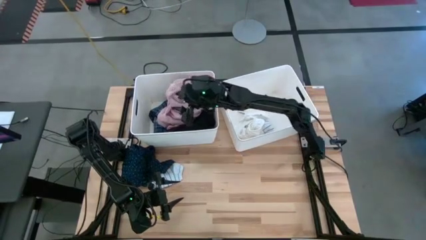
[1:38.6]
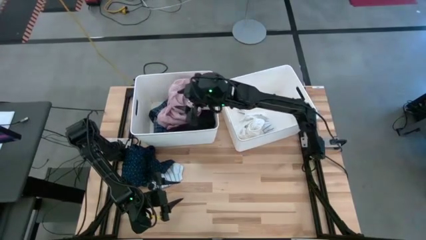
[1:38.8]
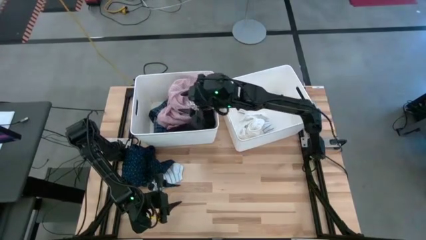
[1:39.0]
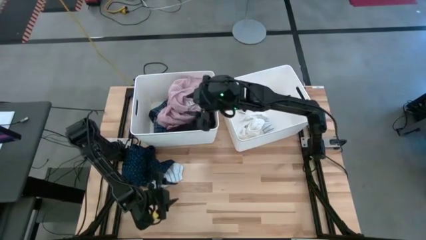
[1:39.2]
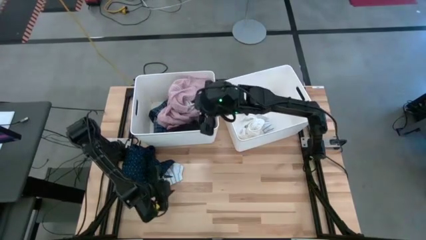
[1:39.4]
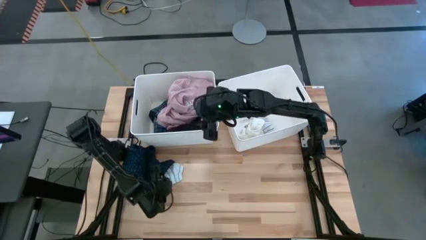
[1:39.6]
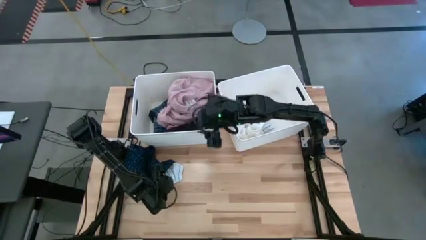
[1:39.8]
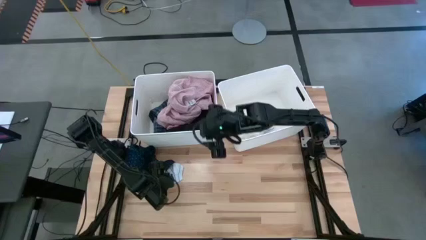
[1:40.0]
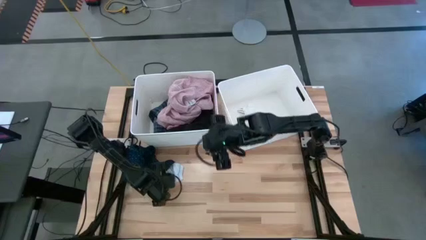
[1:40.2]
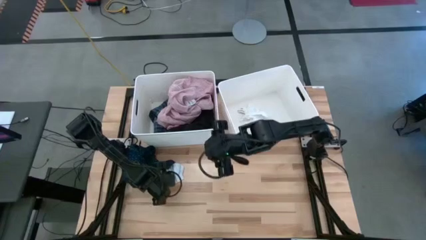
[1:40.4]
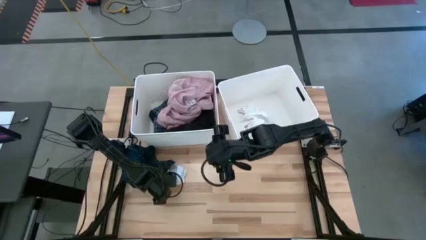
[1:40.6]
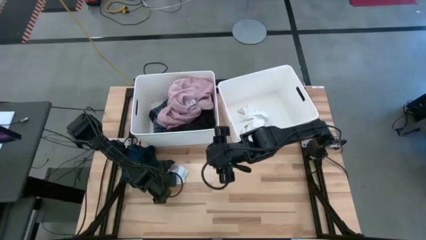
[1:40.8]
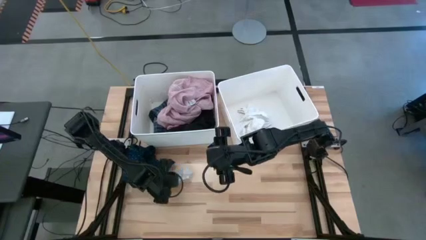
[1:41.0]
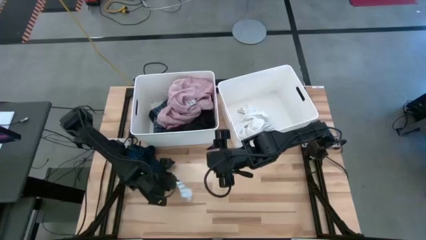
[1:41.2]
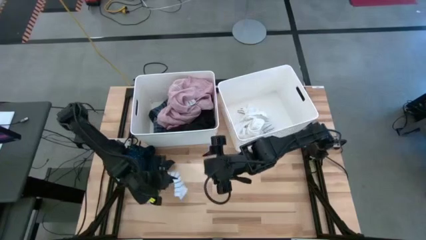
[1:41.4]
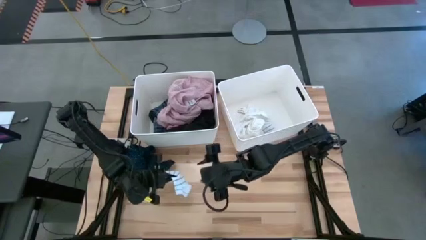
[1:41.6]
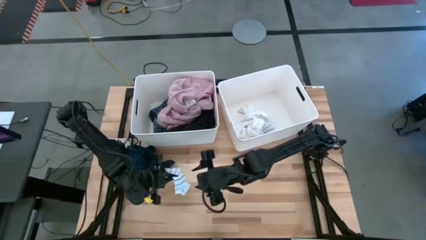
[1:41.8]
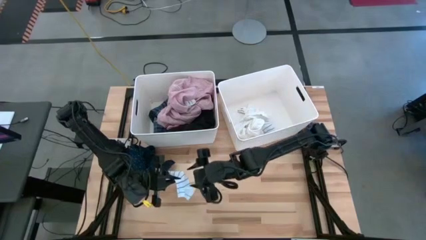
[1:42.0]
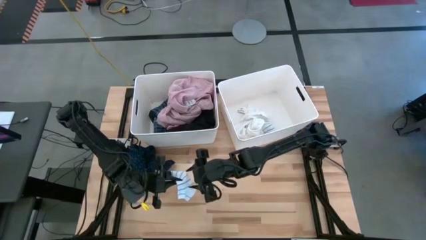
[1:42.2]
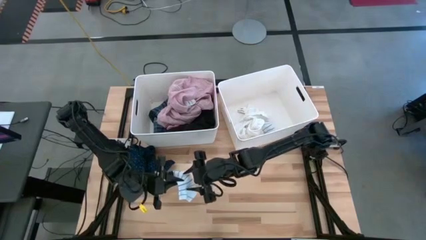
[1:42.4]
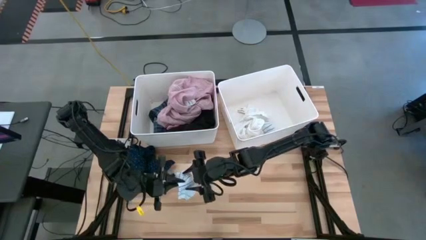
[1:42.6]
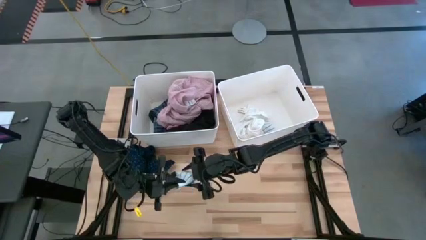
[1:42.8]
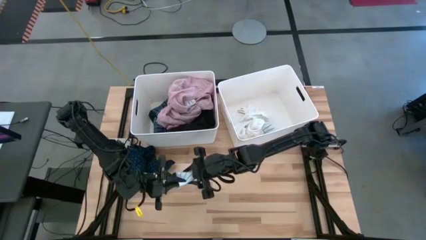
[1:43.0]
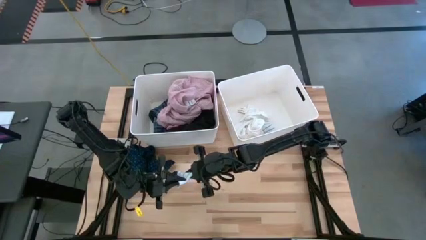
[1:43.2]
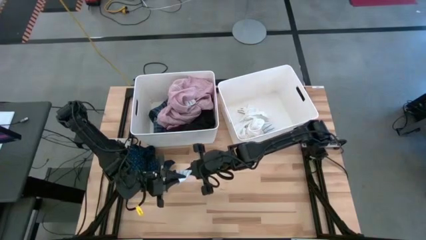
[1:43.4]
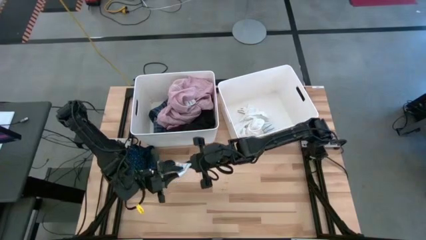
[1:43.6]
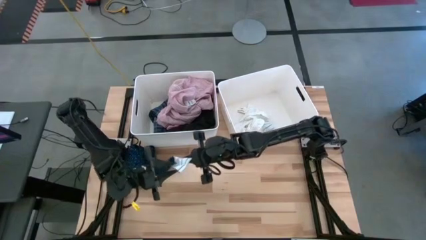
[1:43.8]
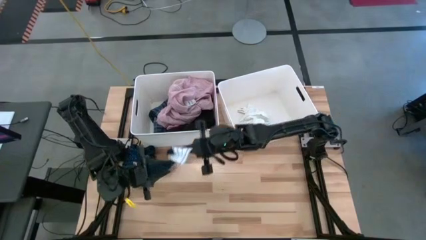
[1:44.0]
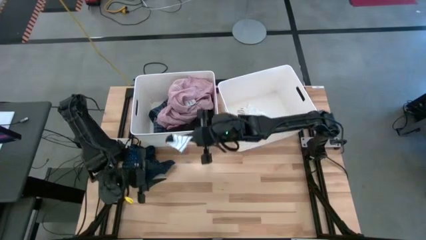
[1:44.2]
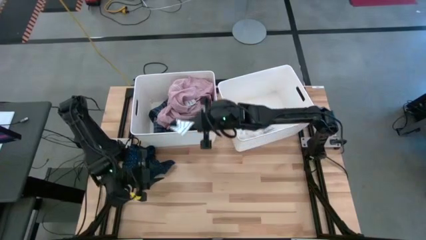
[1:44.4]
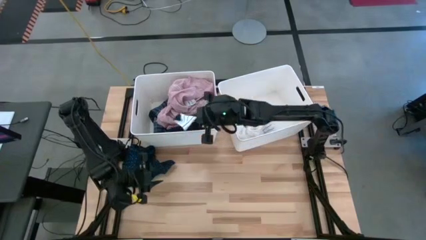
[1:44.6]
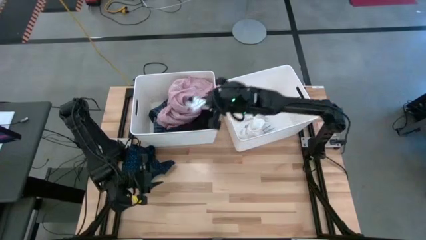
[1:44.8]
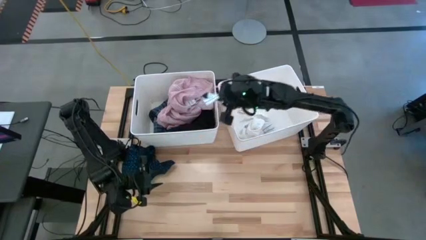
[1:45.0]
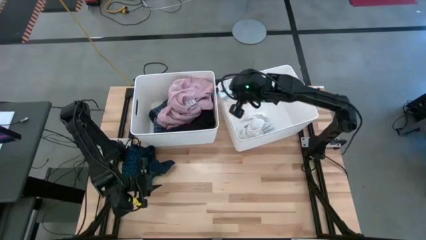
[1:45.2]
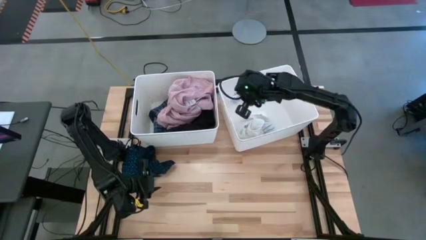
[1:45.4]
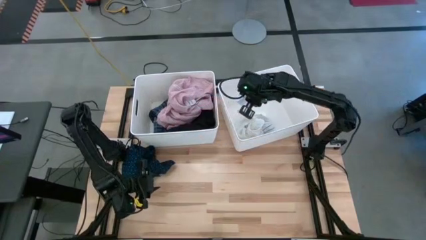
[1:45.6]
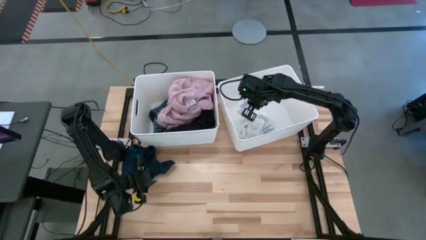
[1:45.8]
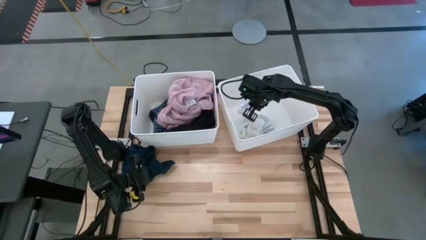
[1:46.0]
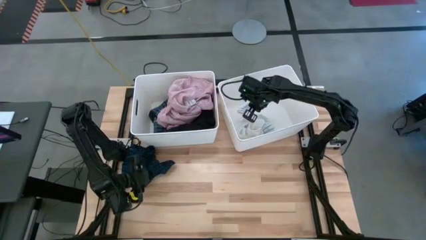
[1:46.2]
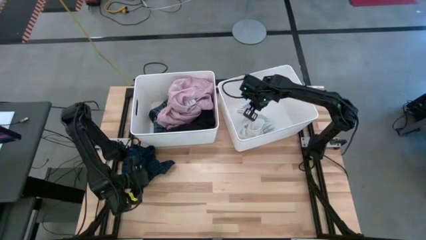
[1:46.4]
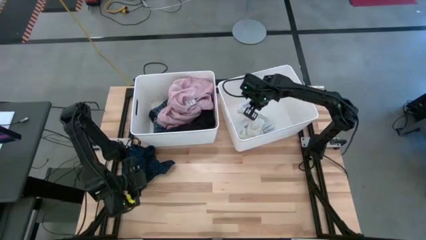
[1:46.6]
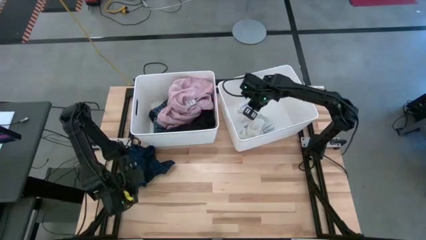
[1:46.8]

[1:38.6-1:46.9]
Task: Sort clothes
Put the white patterned sock into the right laundry bin

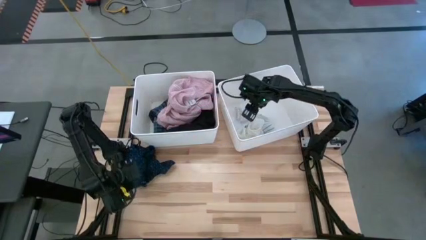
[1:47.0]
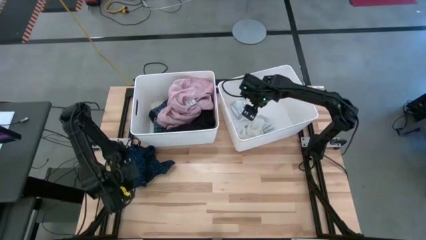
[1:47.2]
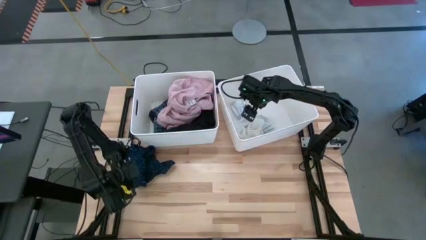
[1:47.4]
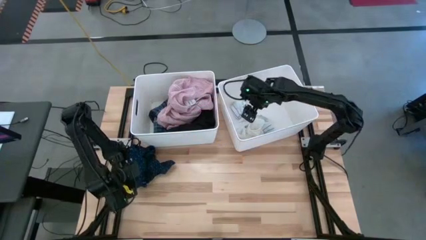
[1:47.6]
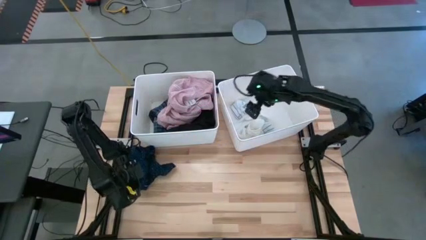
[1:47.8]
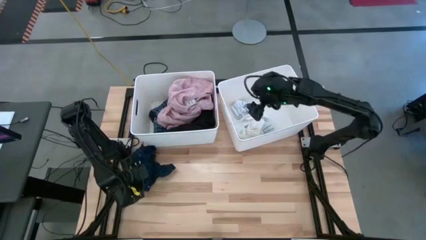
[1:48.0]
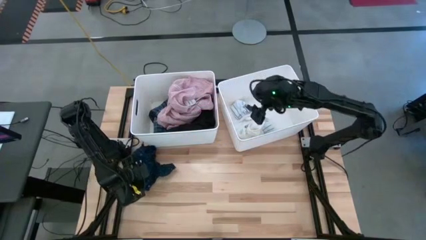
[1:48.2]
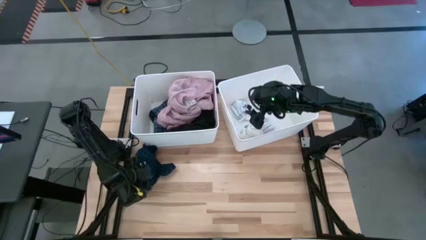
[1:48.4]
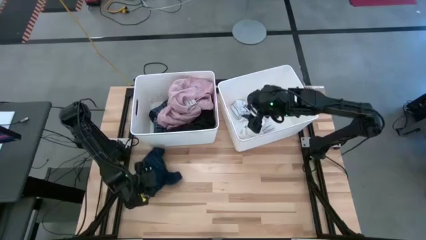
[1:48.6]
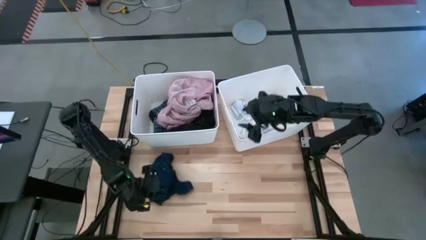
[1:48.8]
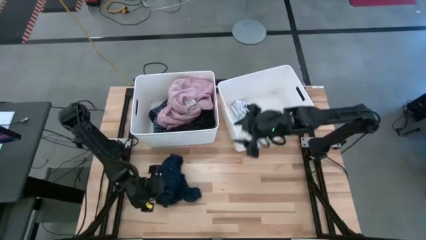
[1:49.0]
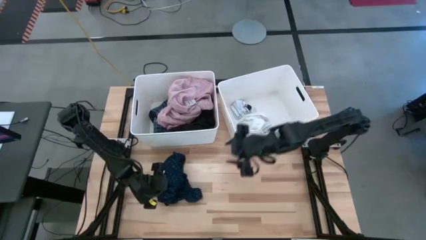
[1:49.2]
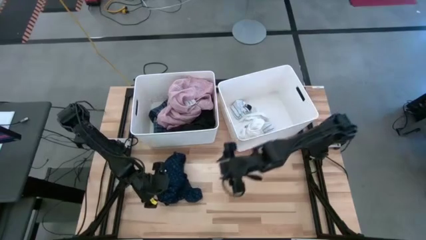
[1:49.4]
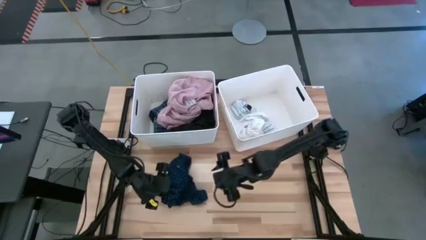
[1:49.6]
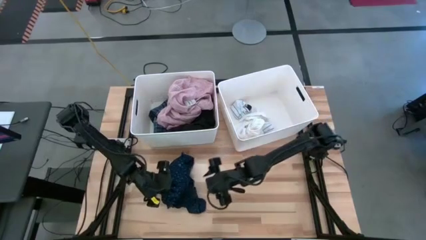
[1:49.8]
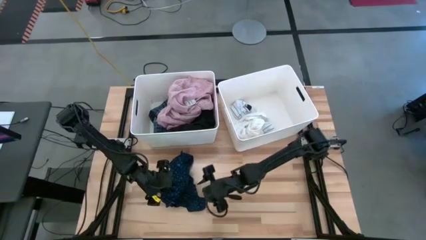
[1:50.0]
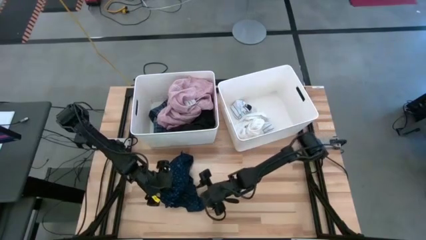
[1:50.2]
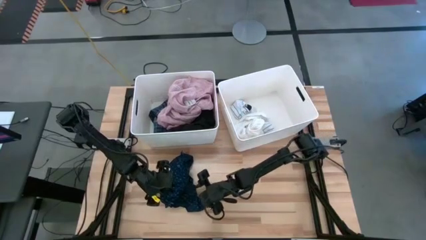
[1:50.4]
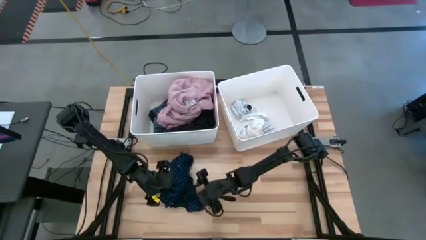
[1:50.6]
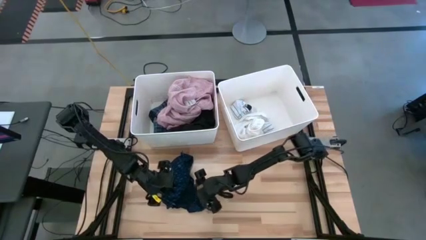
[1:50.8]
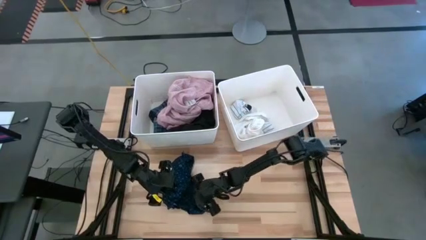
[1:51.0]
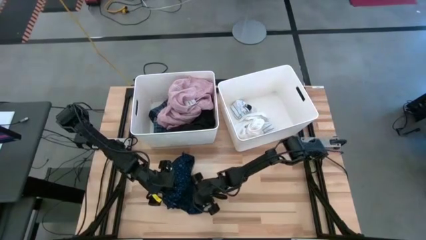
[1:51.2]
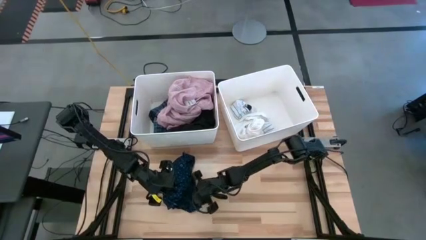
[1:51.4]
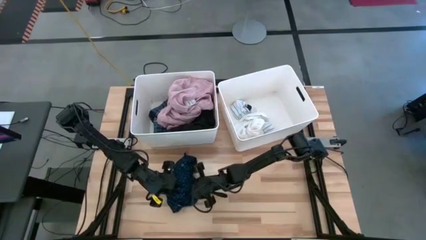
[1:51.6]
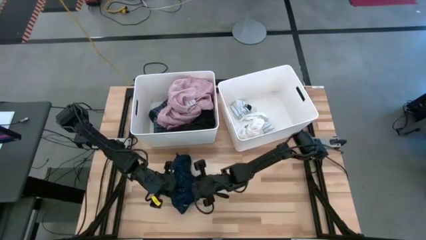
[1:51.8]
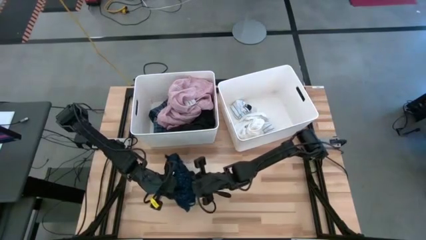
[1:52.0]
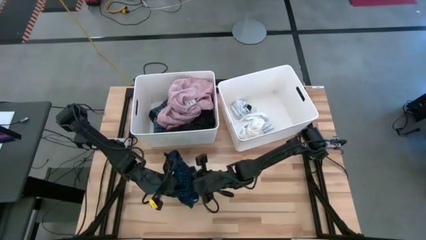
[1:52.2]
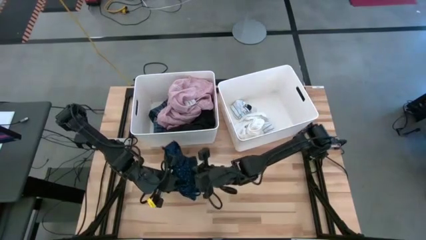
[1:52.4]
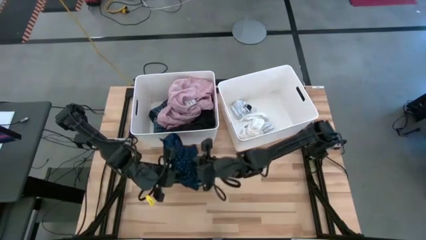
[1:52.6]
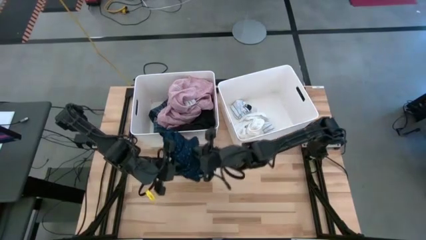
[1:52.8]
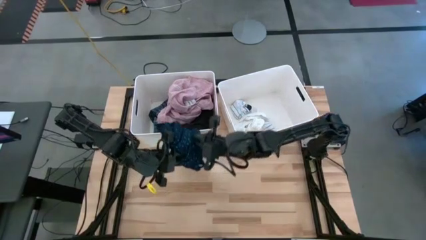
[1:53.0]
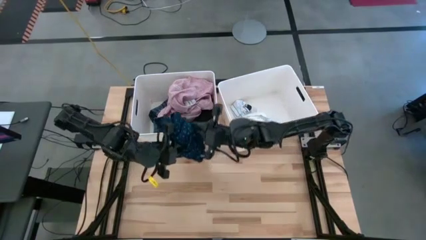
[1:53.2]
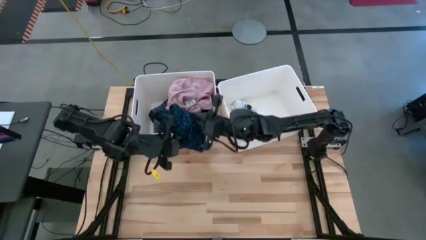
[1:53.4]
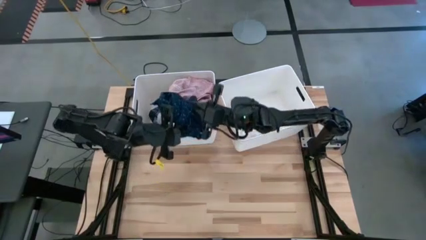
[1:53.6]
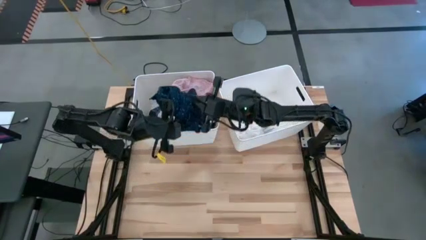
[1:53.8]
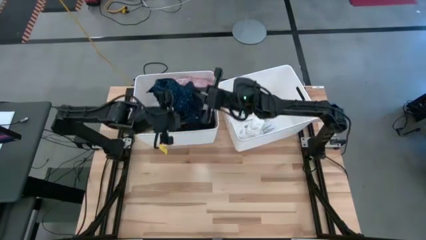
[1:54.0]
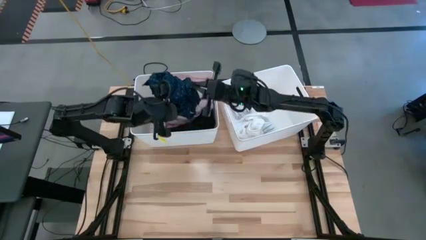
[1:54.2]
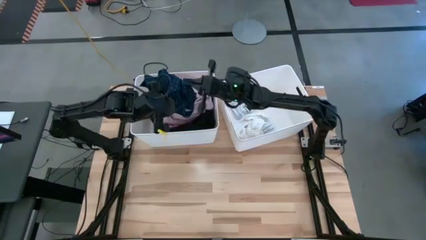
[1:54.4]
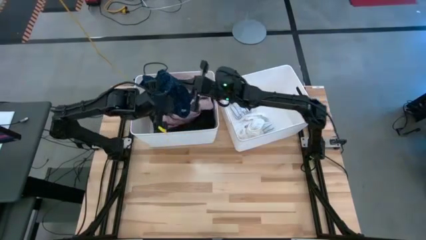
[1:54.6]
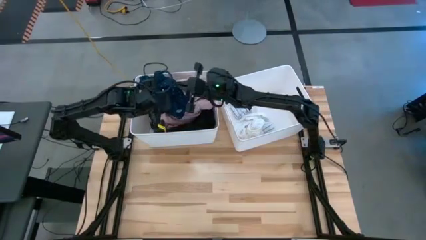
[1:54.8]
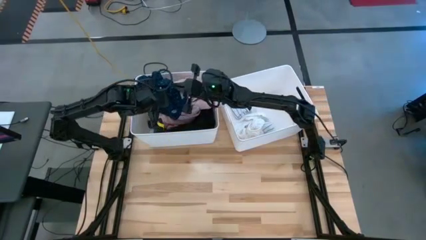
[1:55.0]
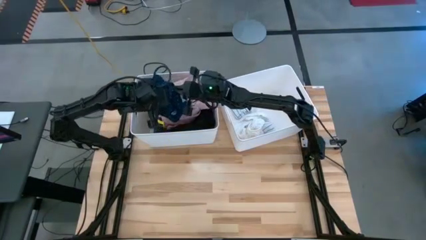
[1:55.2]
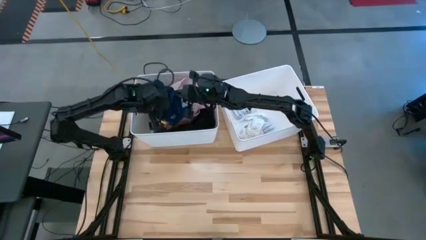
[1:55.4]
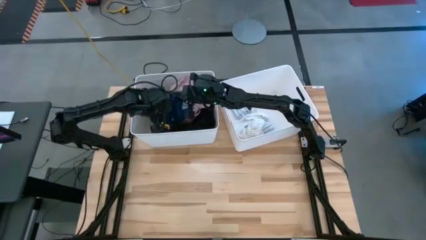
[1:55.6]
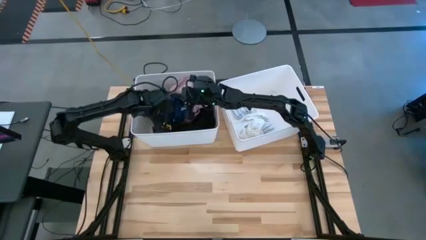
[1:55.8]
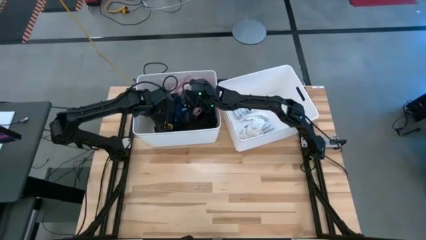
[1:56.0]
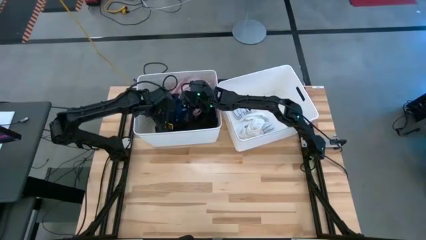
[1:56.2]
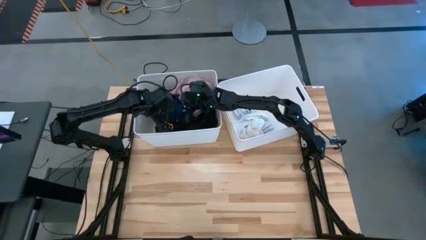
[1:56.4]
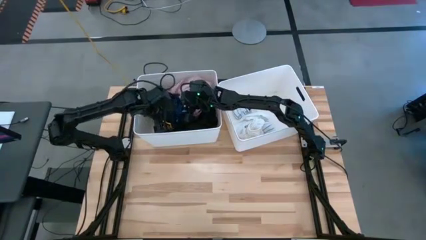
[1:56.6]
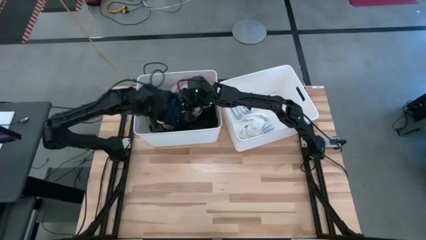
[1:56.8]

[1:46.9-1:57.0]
Put the blue cloth into the left laundry bin
